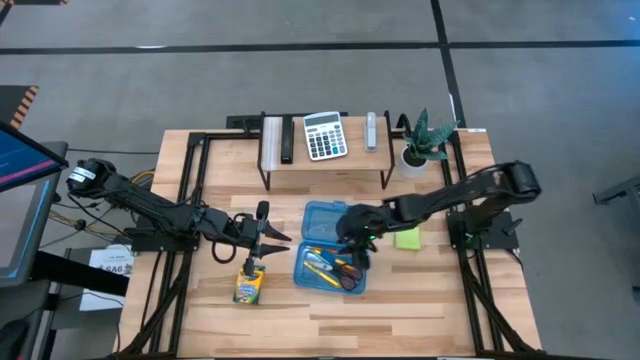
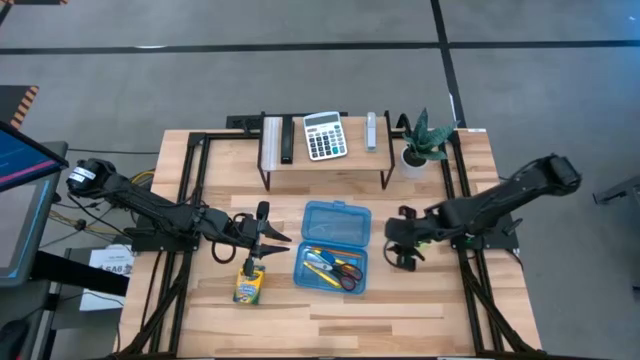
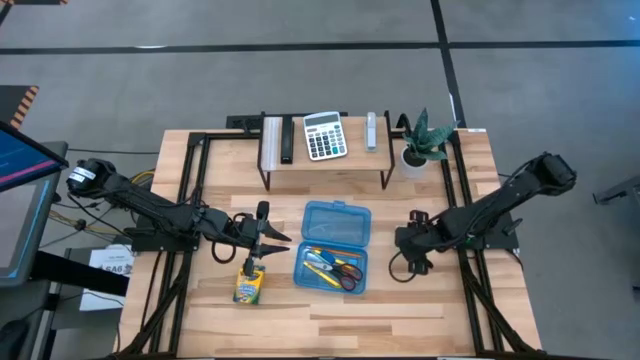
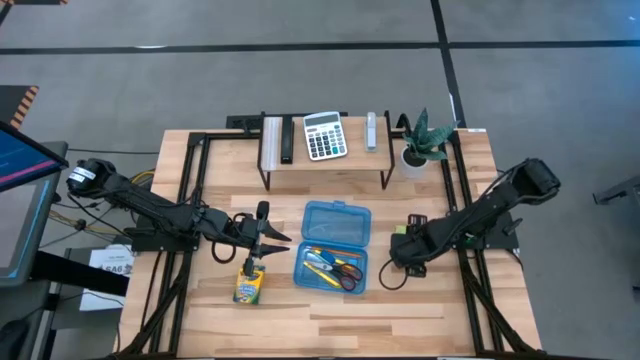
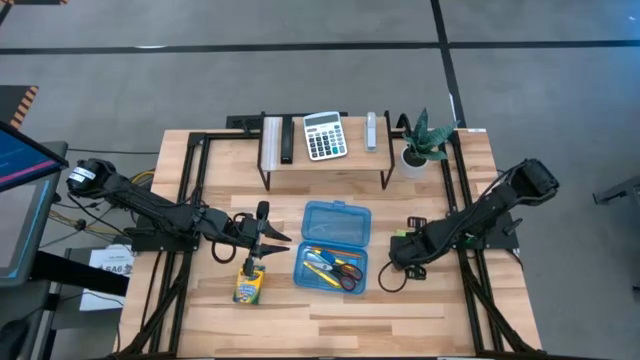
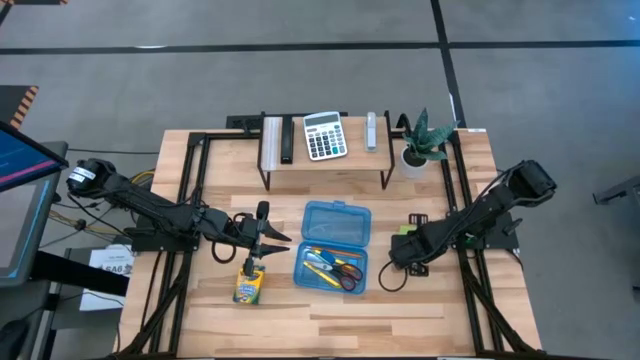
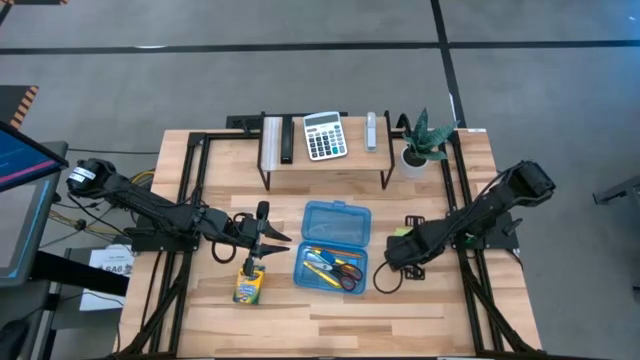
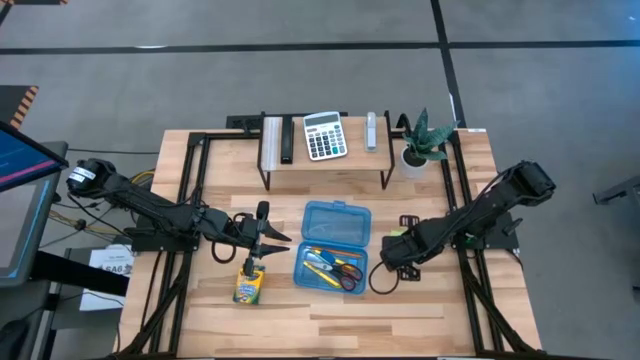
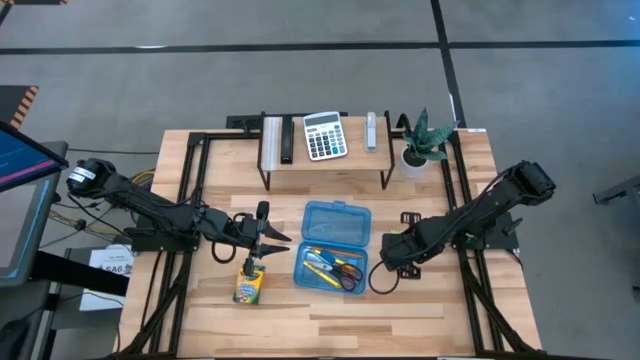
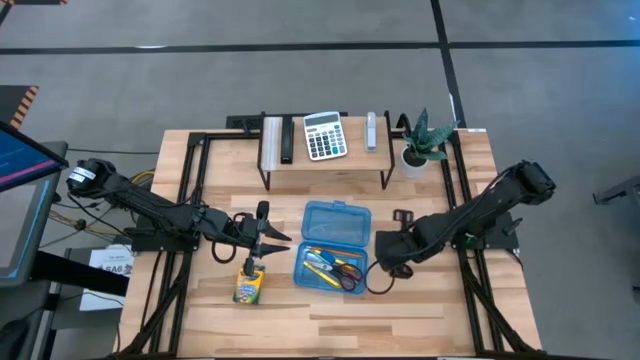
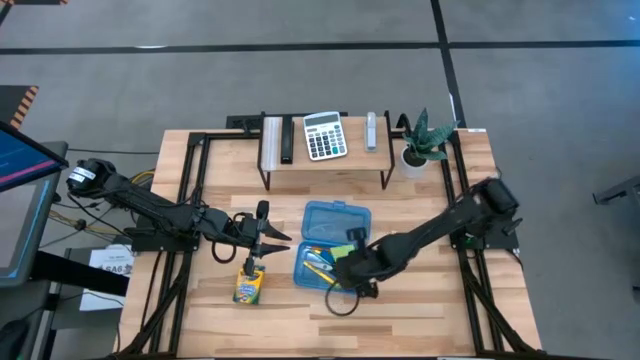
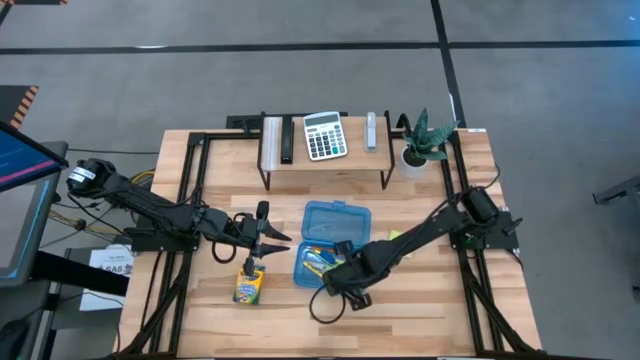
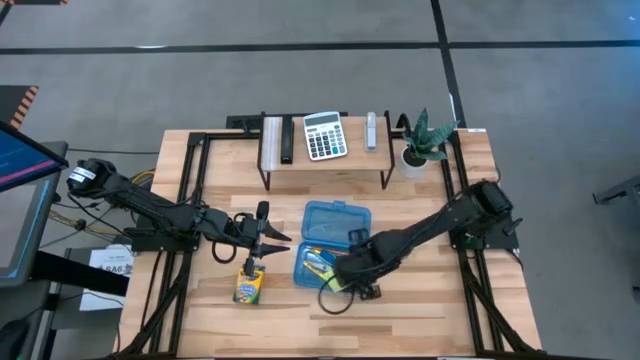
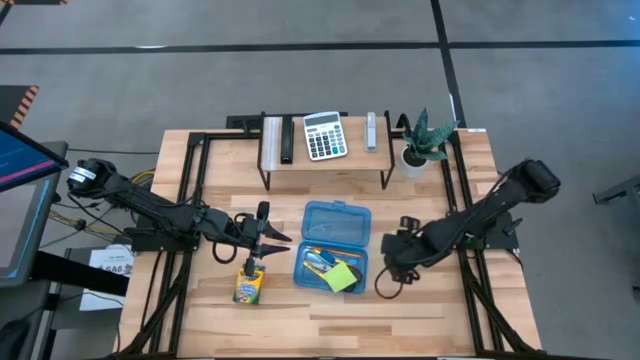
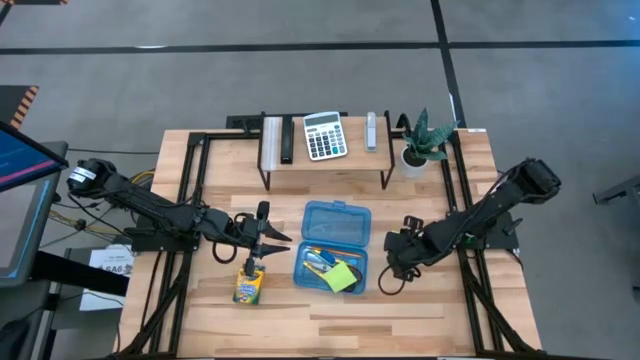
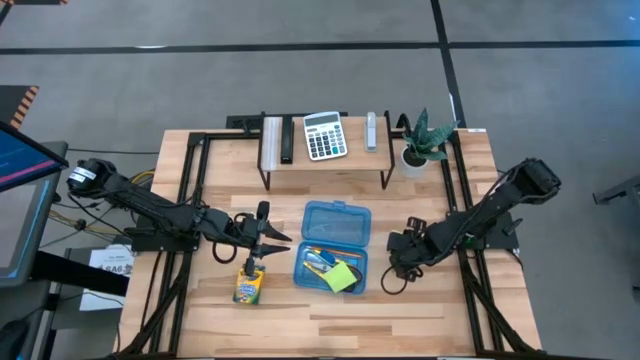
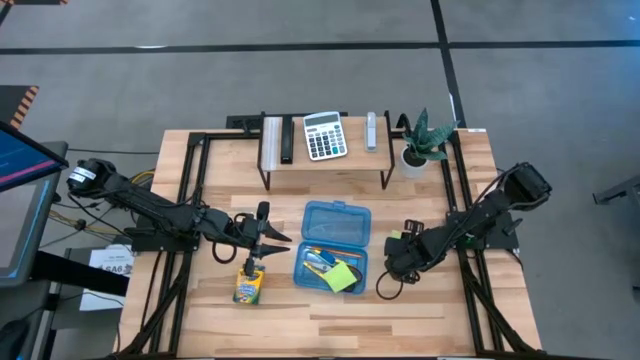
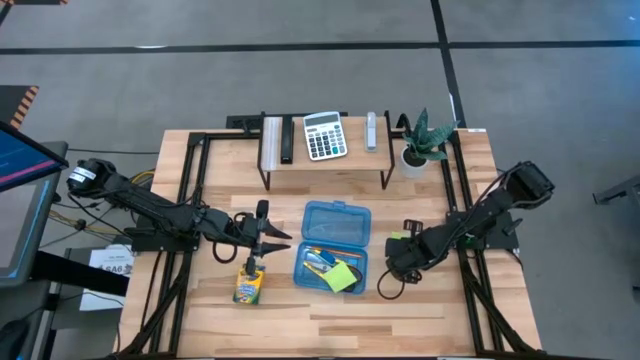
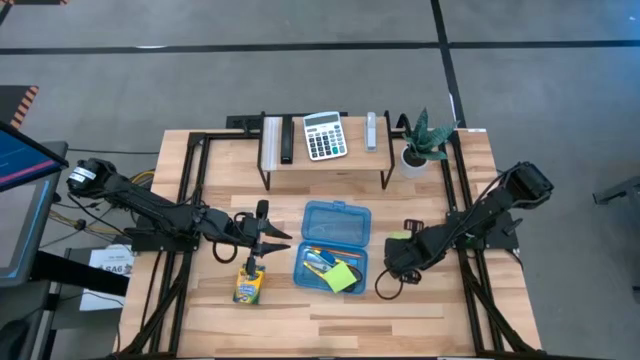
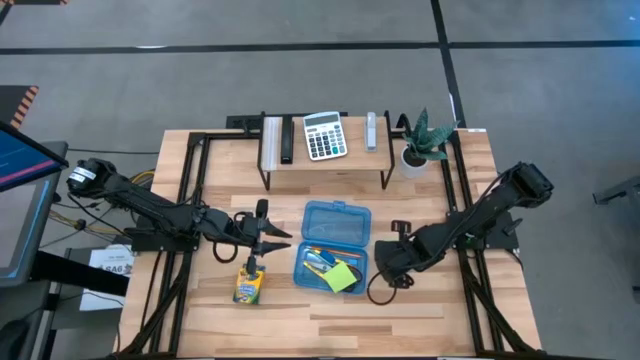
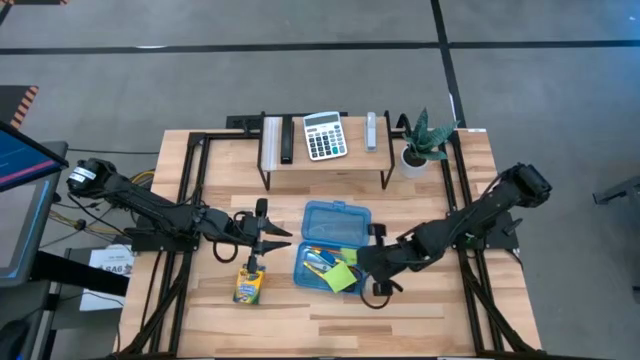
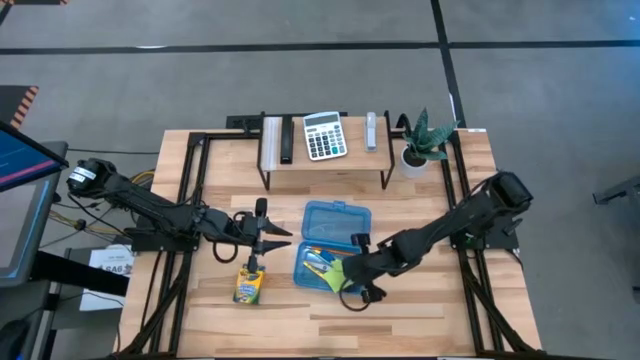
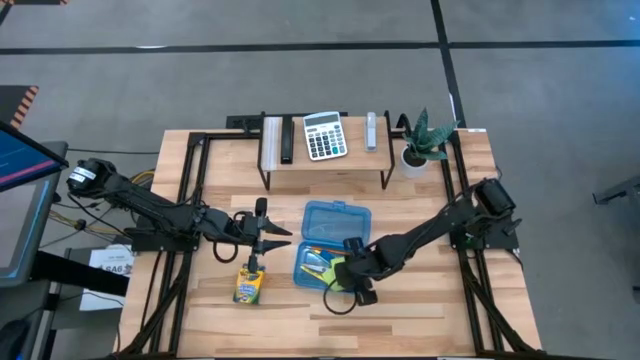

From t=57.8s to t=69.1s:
Task: Pack school essentials
Put the light green sticky notes into the supply box

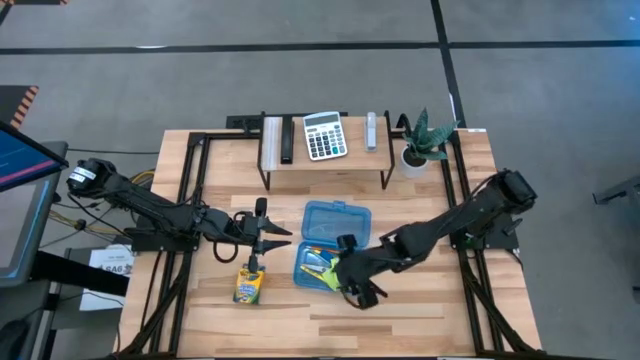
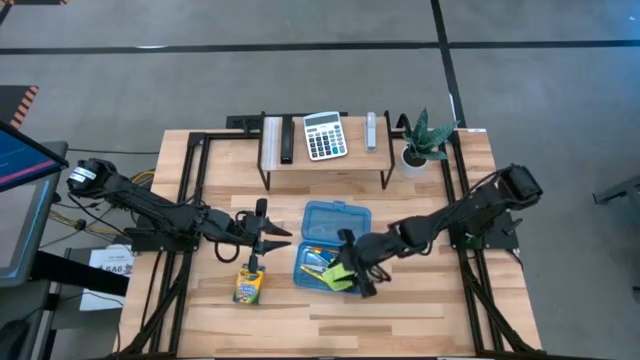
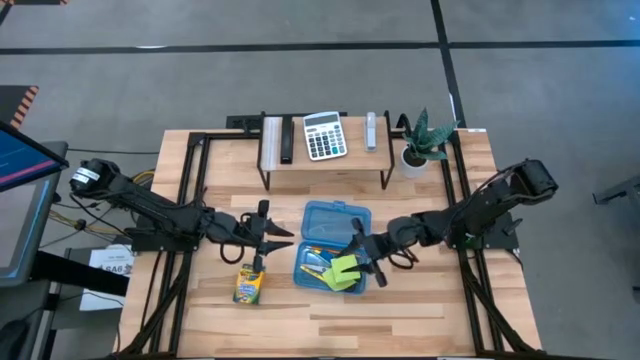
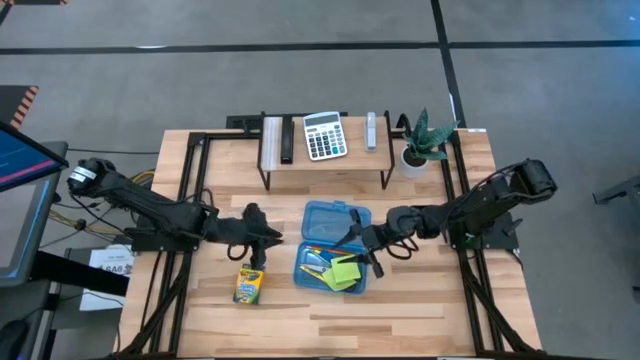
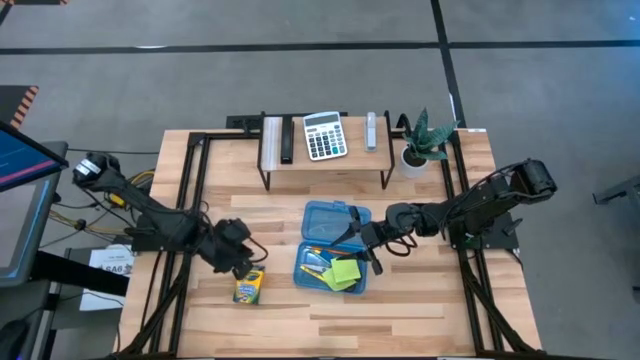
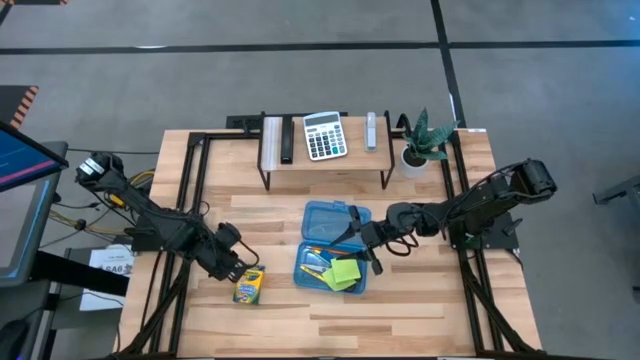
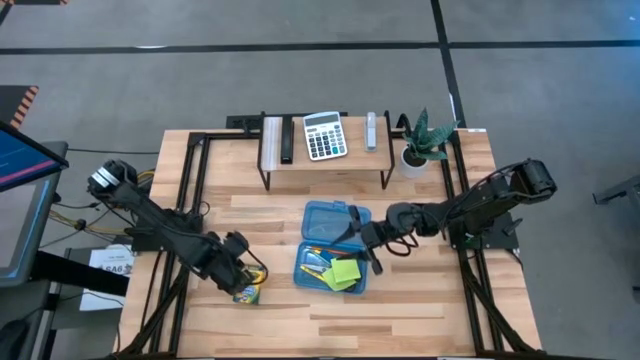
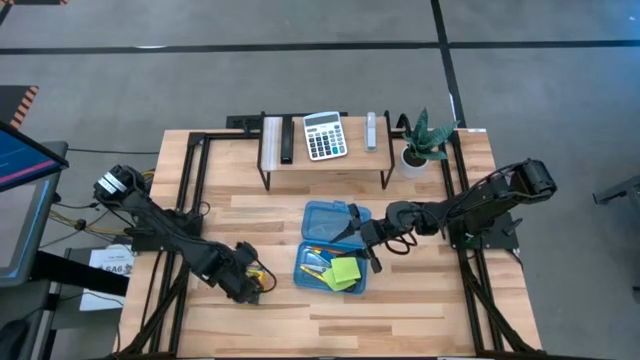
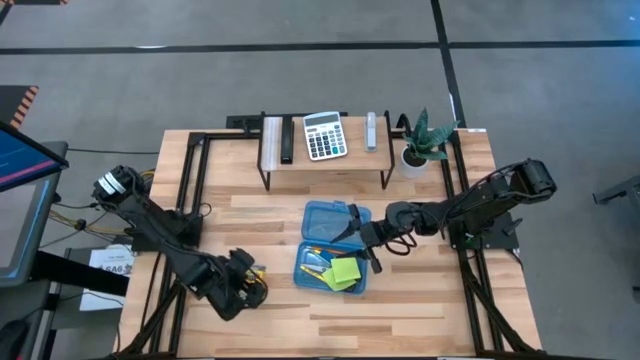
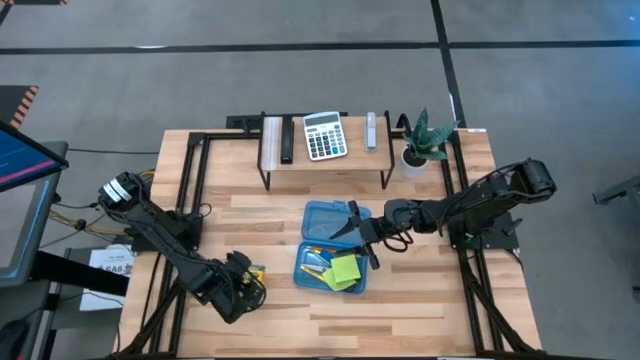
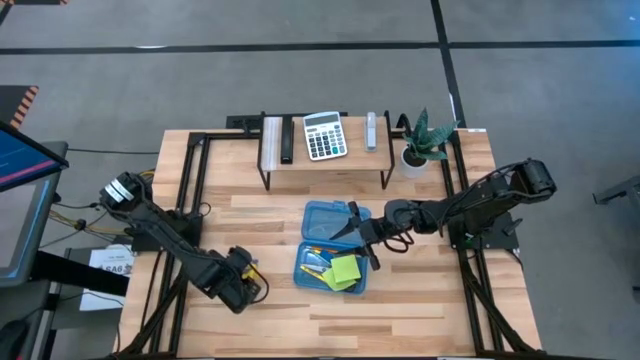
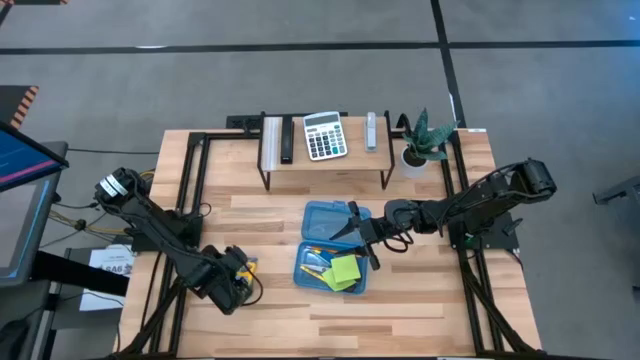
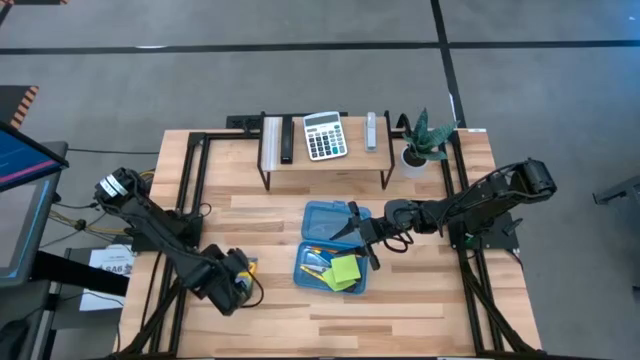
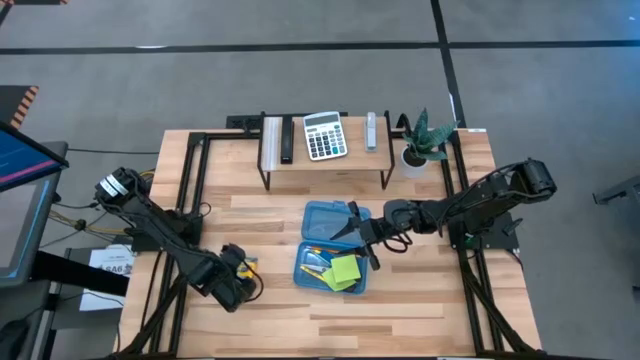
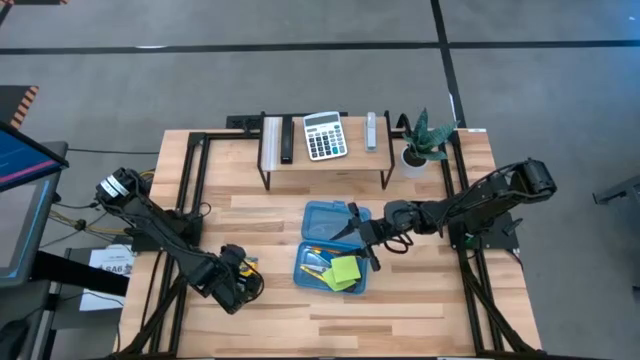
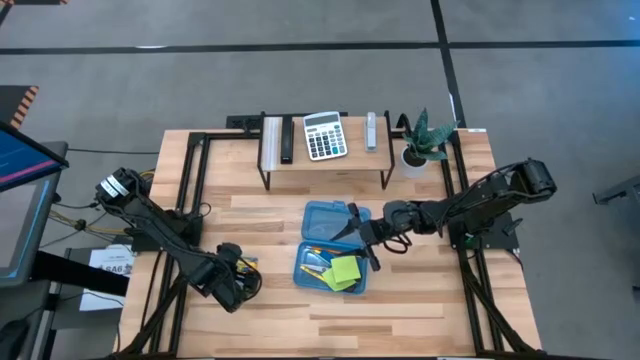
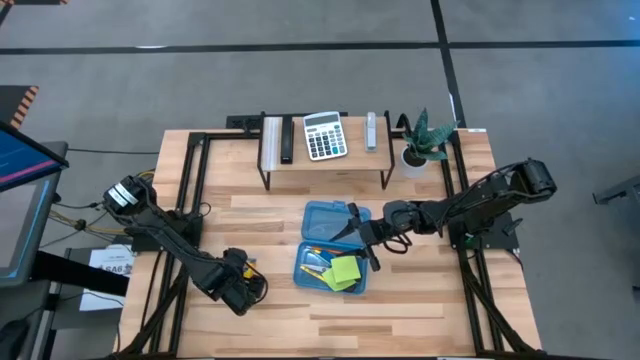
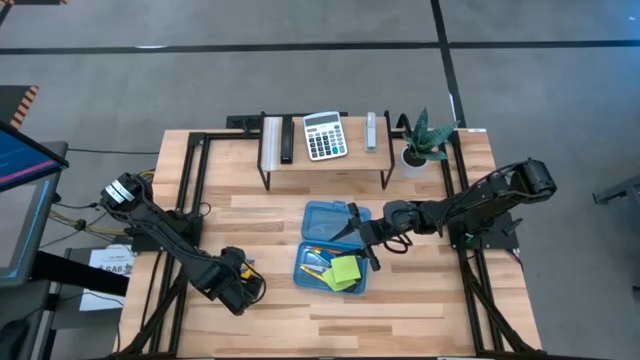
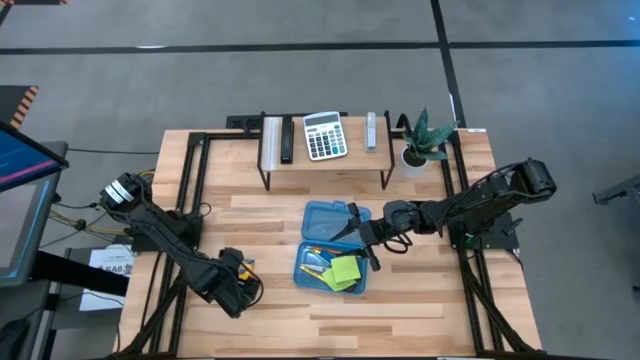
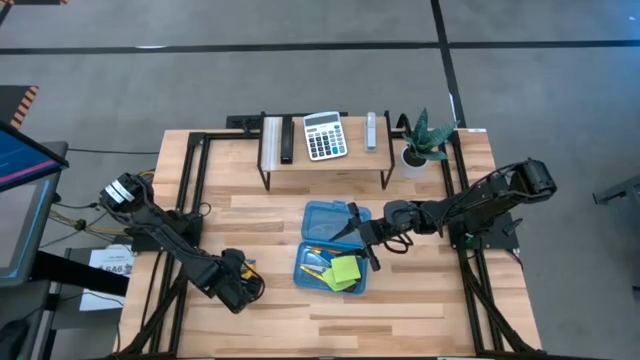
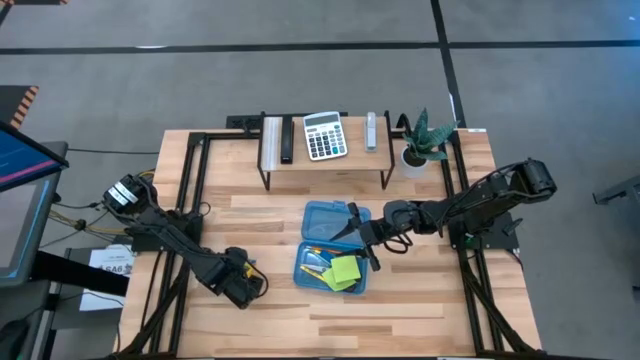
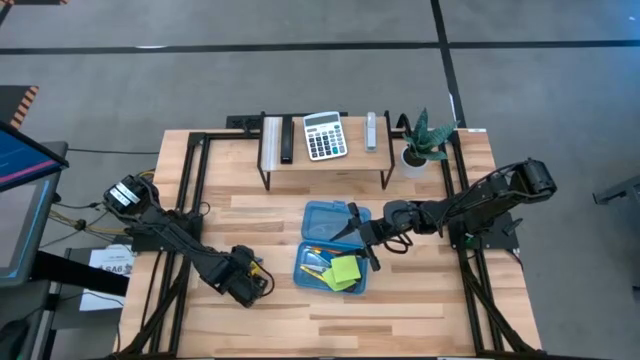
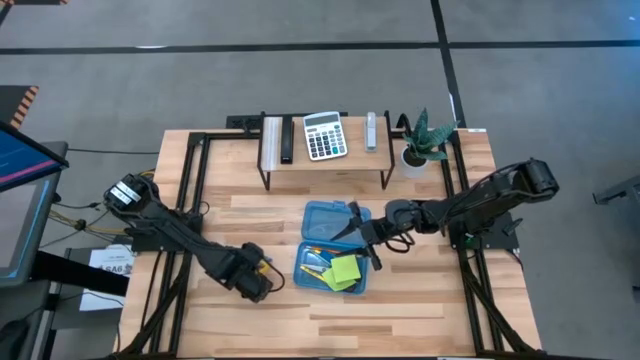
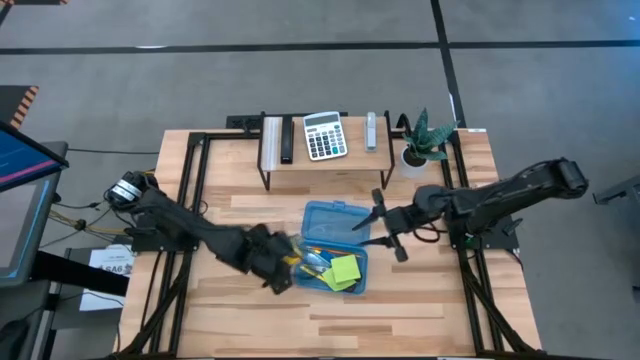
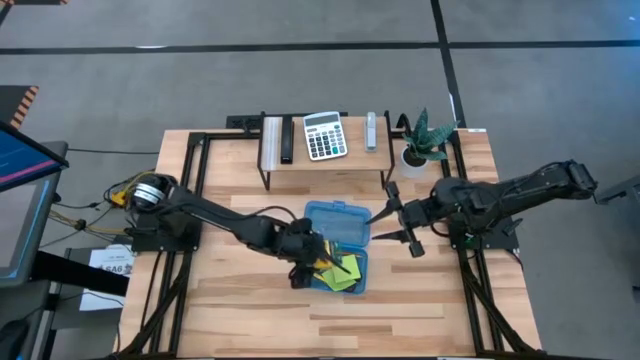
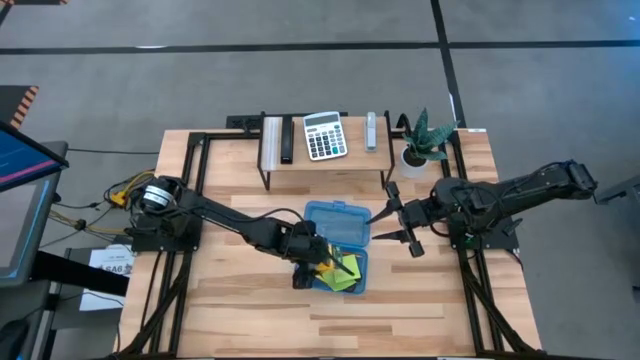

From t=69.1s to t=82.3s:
Put the crayon box into the supply box
